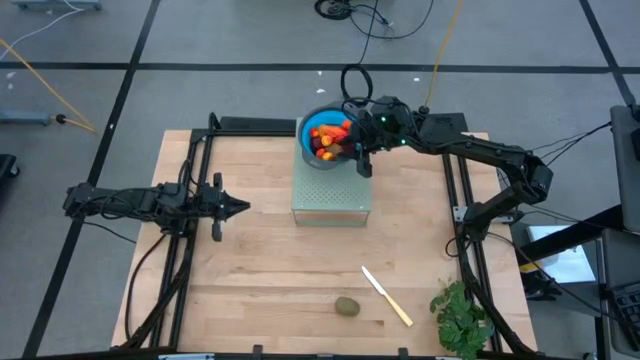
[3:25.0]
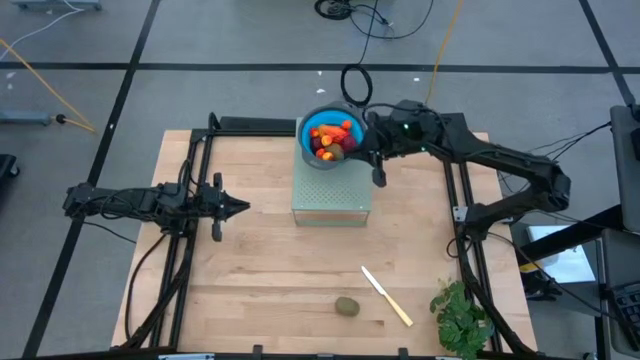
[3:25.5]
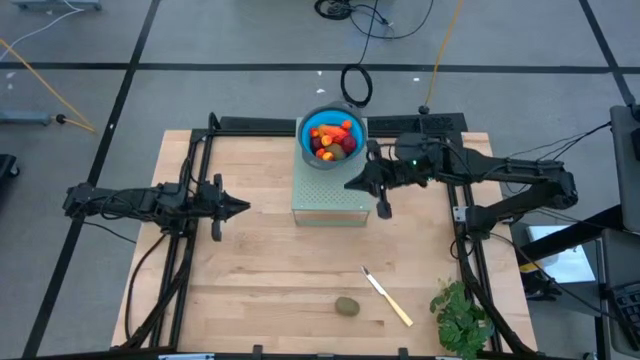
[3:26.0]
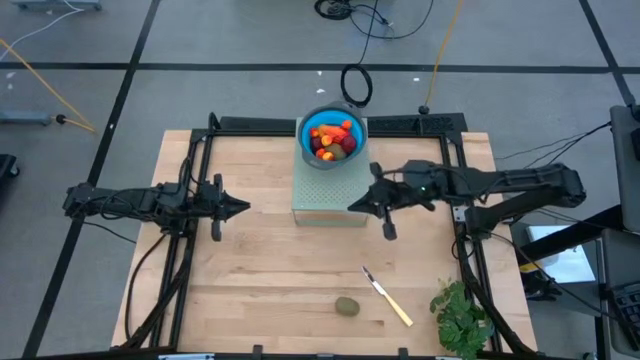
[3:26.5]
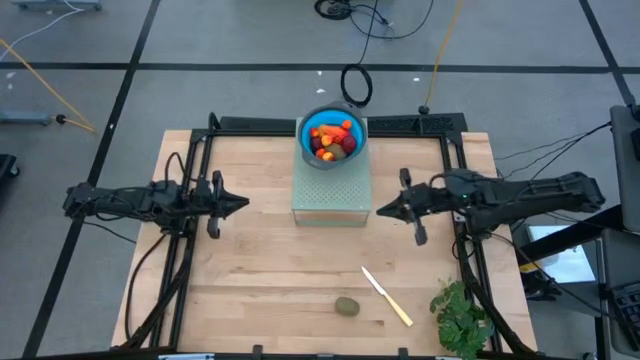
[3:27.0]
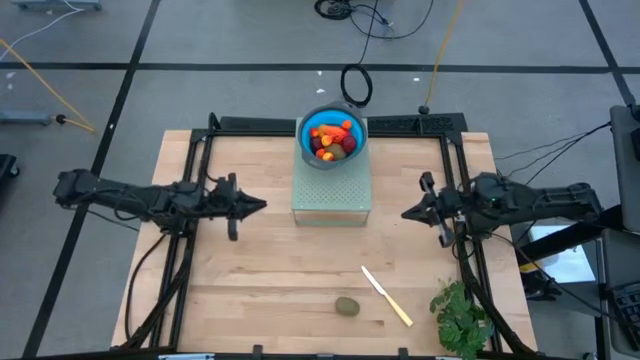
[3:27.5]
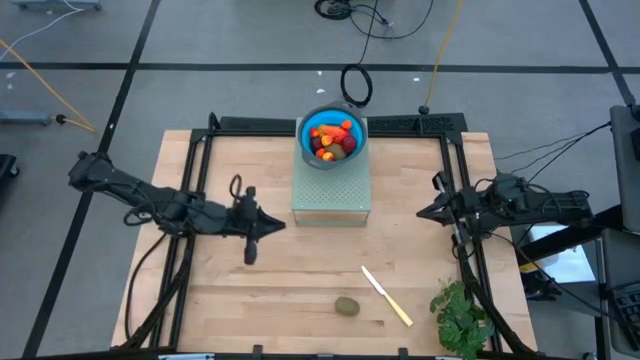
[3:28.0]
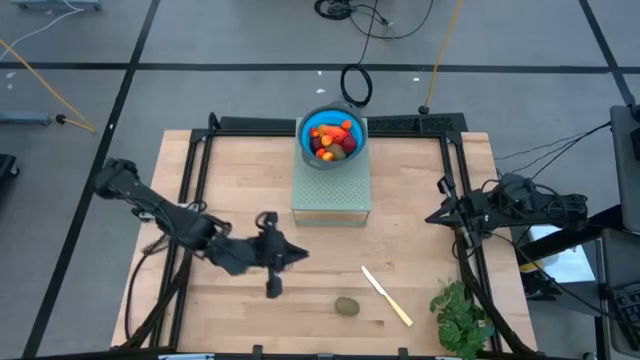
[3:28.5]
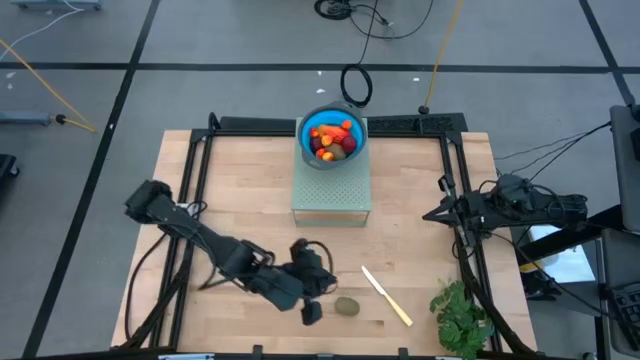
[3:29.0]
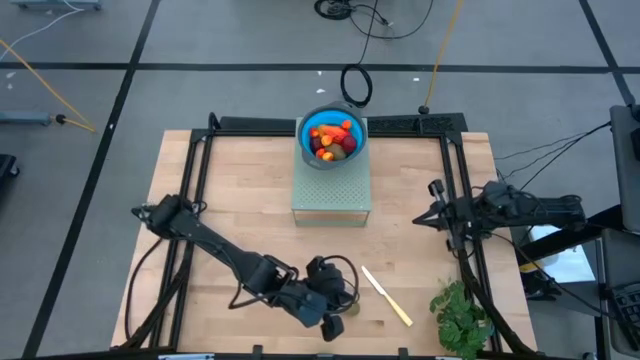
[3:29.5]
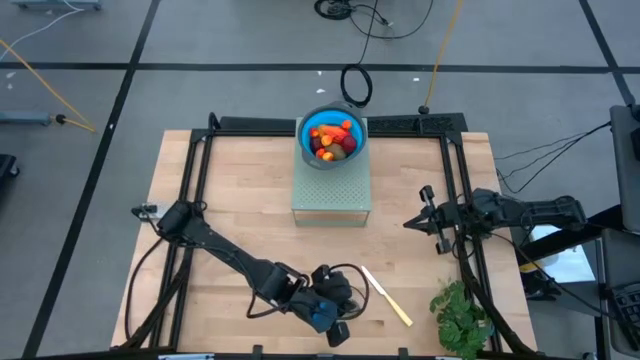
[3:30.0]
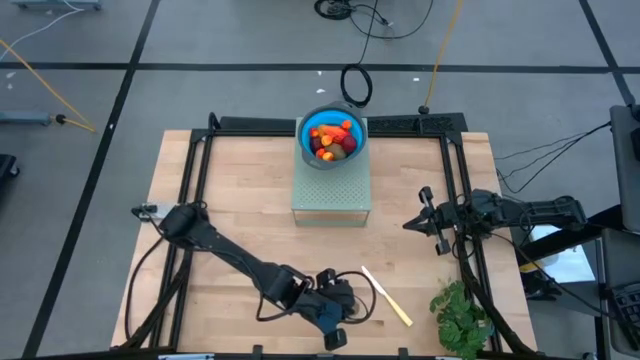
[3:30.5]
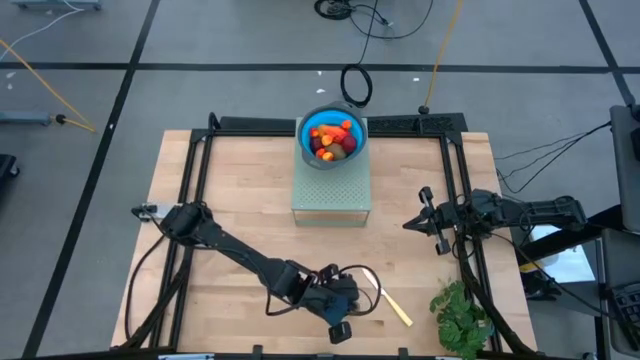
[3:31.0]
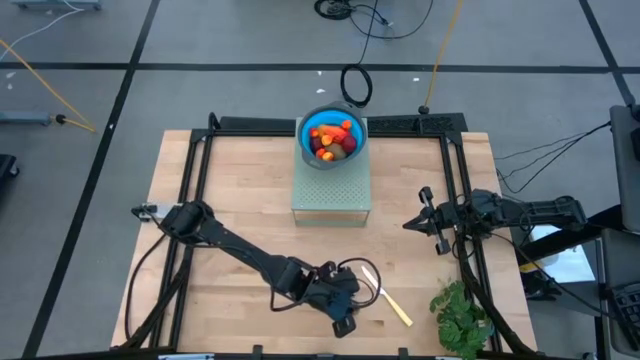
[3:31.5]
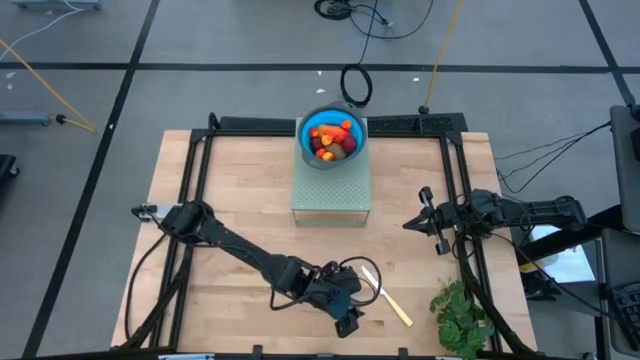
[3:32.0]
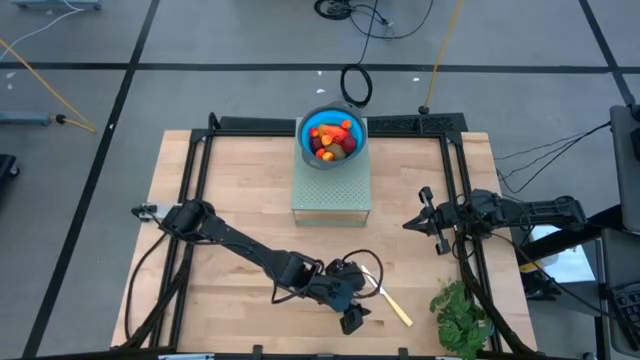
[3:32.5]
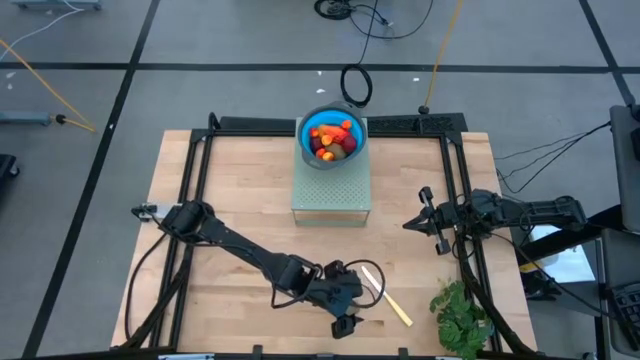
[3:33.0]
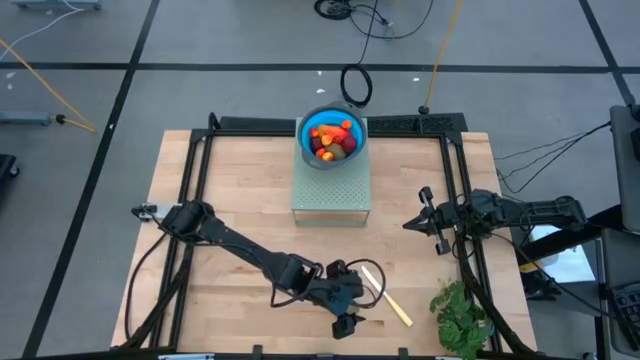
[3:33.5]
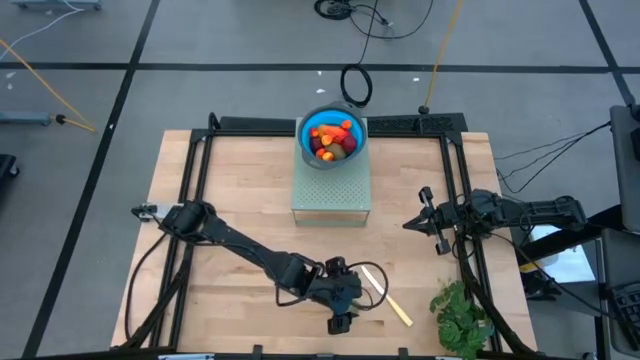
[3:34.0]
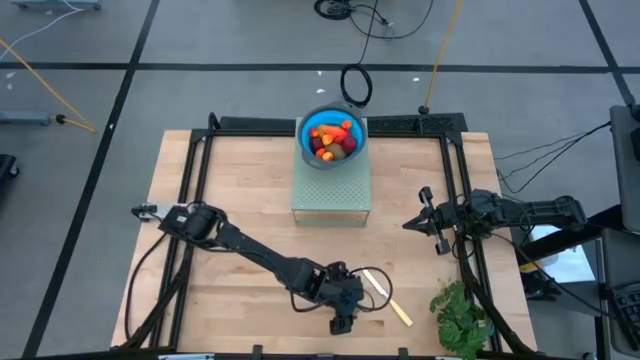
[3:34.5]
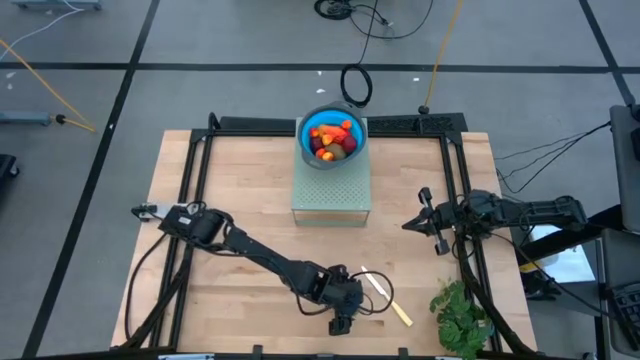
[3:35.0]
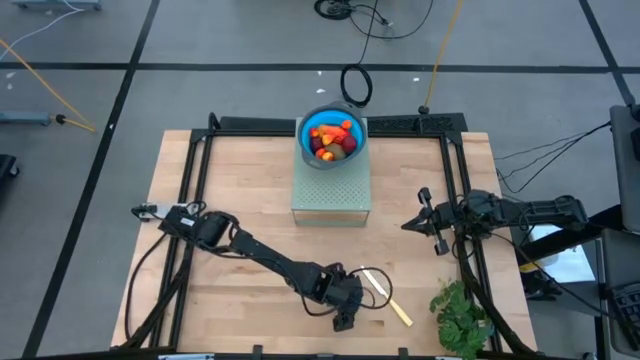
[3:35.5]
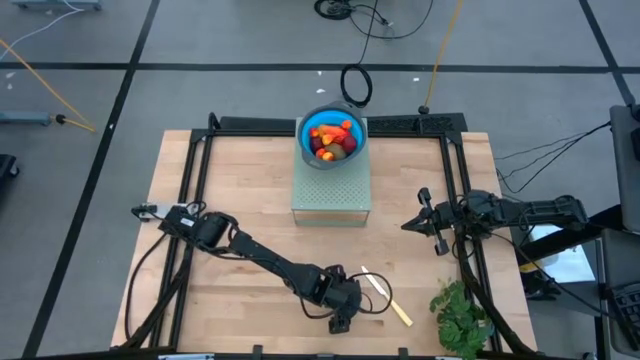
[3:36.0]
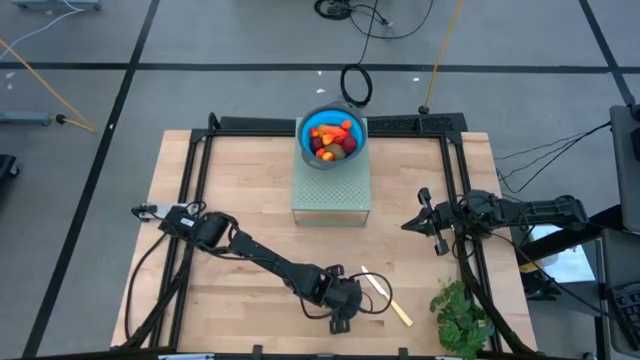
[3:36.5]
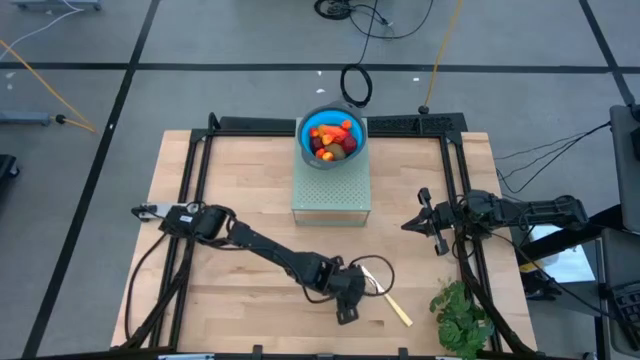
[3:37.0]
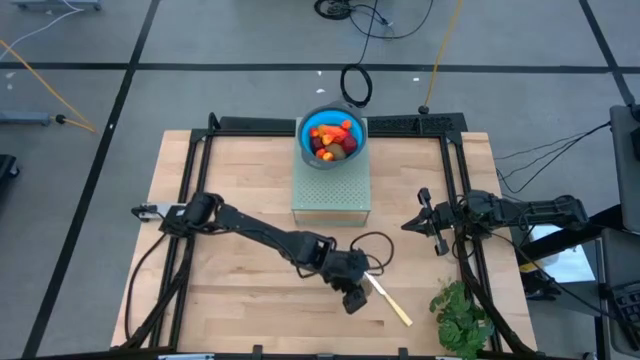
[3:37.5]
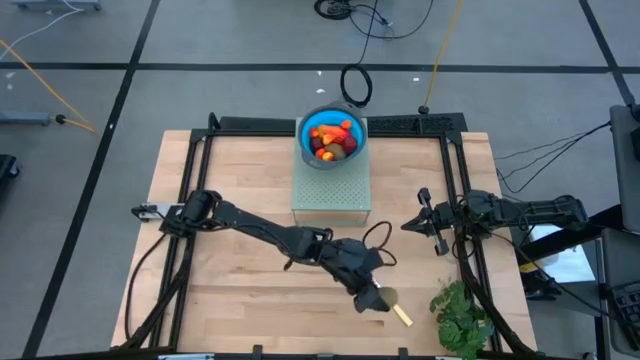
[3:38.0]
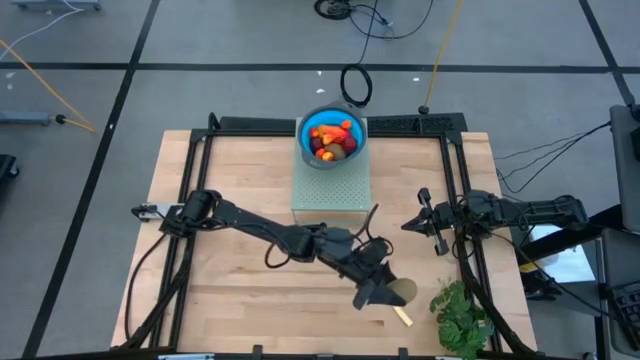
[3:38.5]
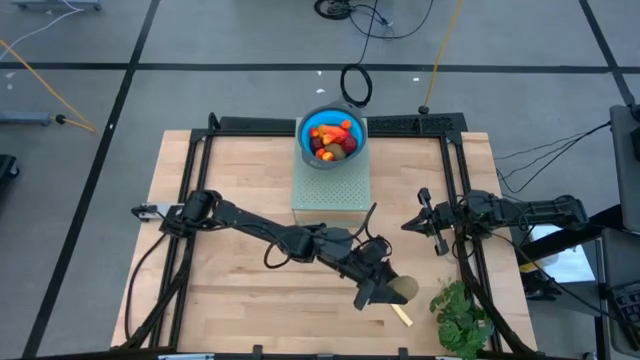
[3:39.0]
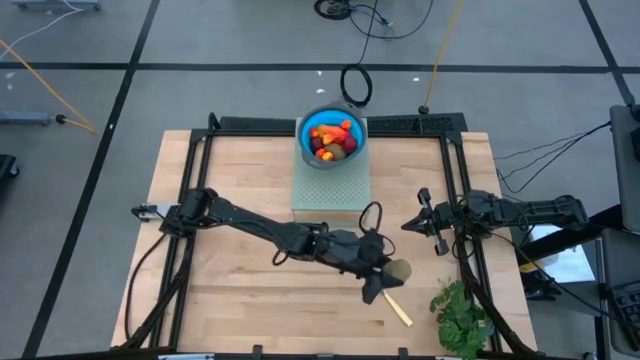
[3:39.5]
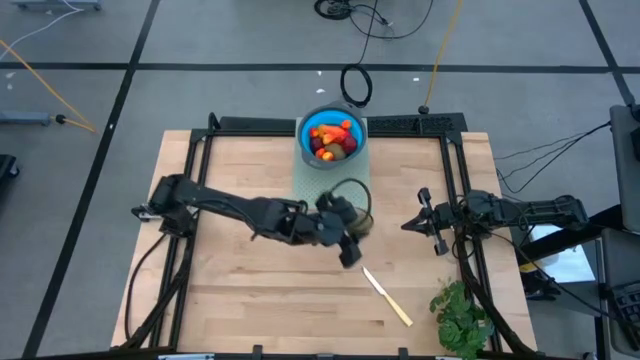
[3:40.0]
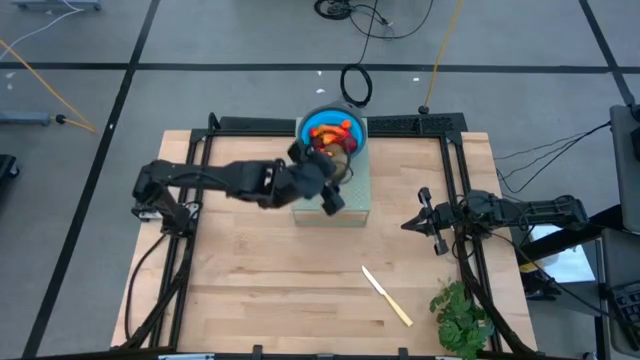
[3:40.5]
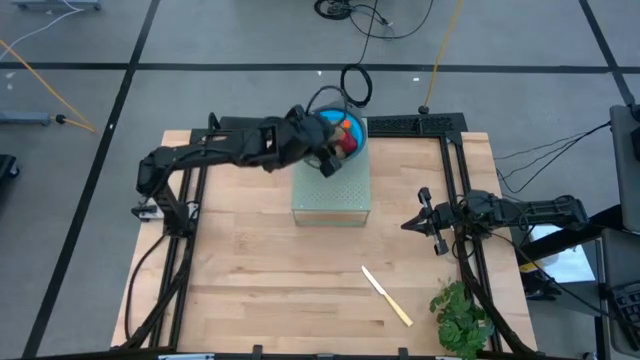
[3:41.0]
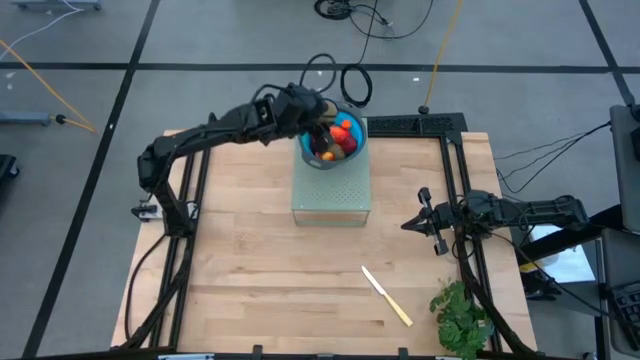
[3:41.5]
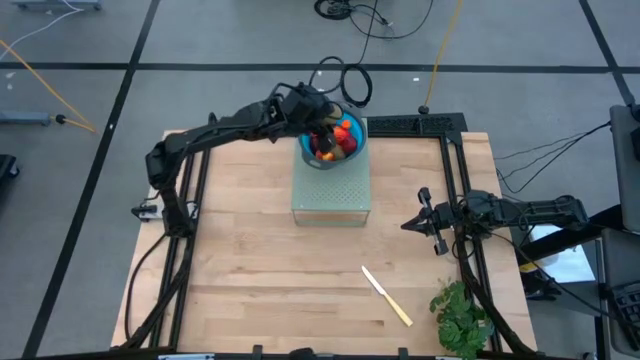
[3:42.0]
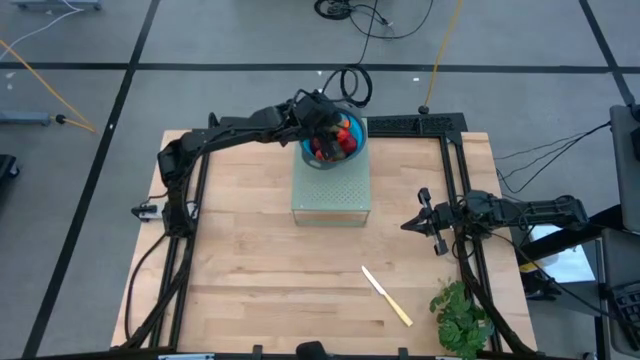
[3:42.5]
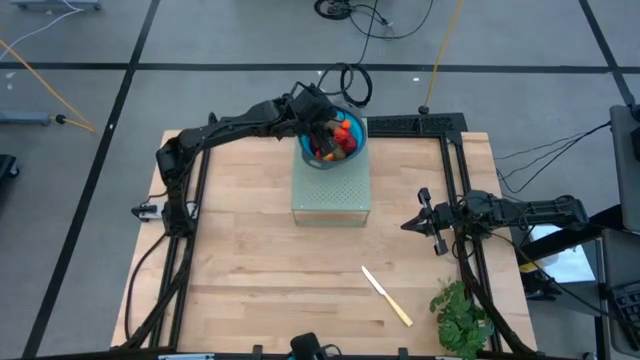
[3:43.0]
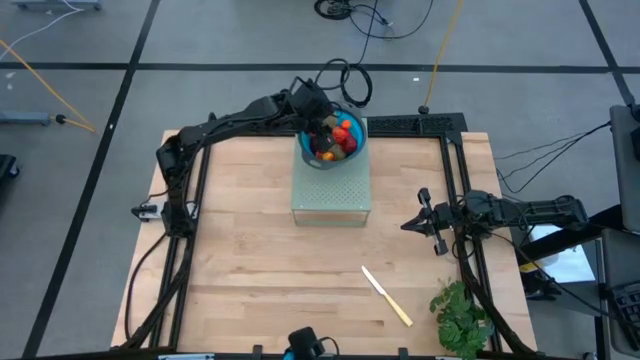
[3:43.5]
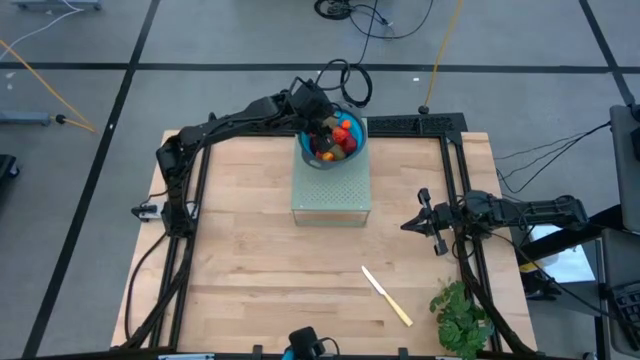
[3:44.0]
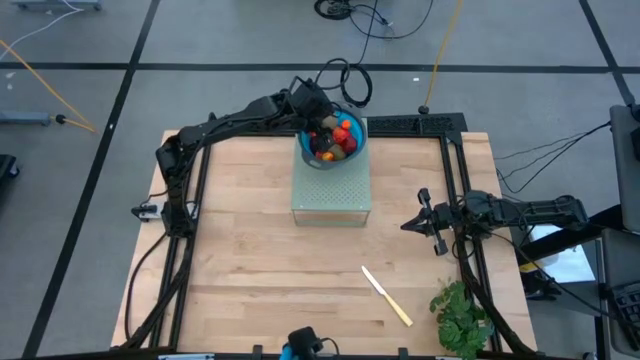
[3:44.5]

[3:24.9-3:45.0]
Task: Pick & Place Fruit
Put the kiwi into the blue strainer bowl on the shelf
